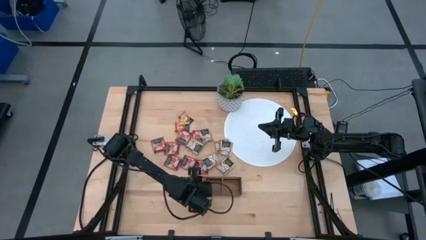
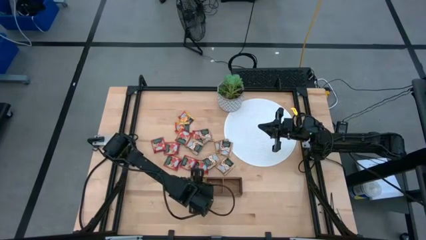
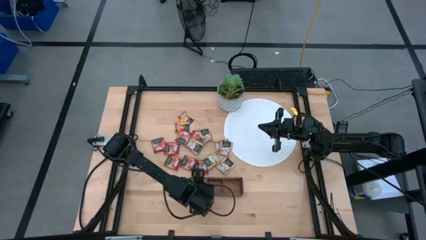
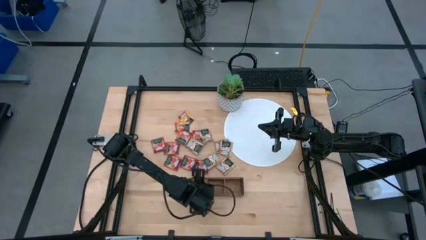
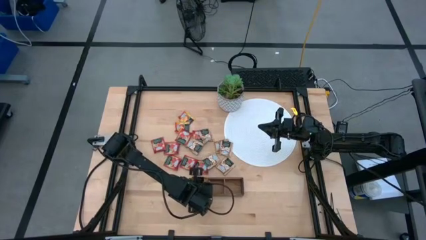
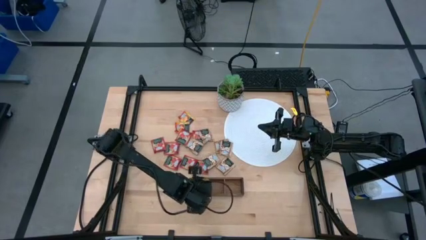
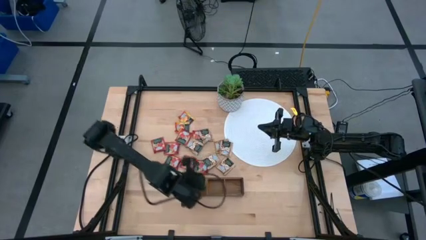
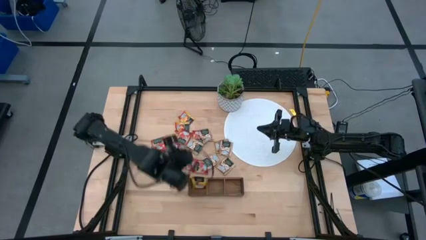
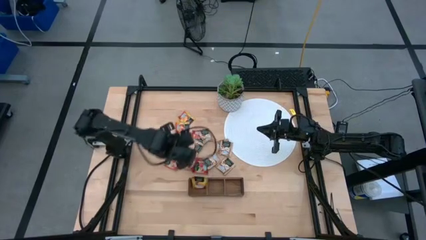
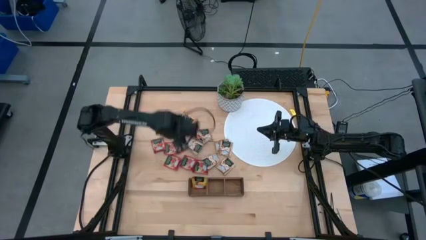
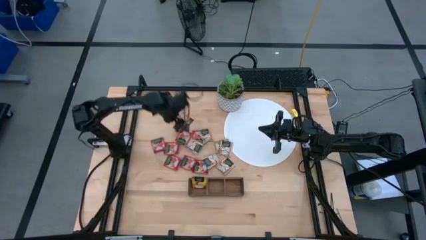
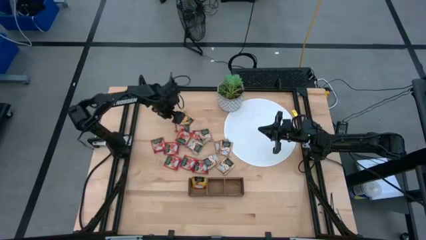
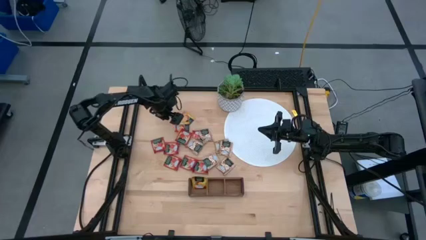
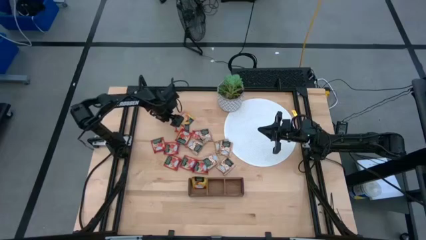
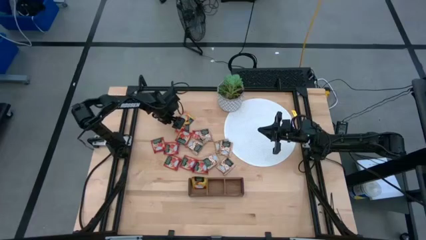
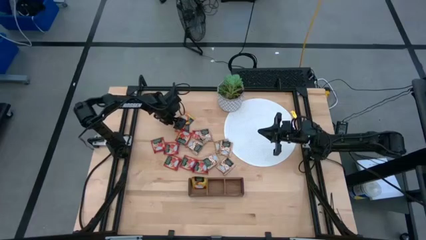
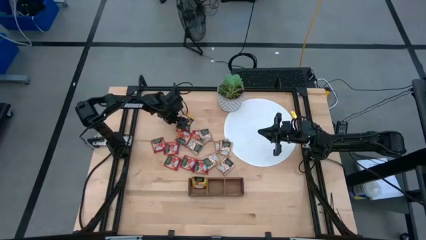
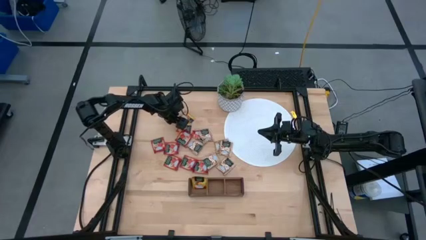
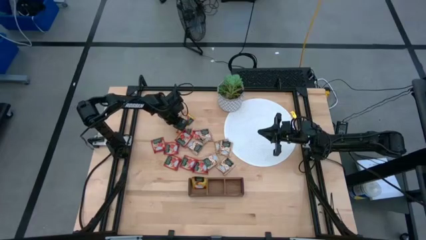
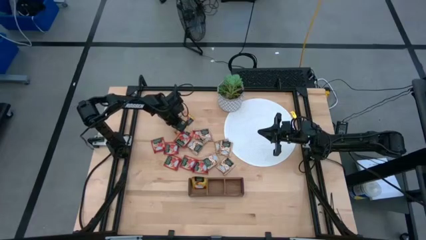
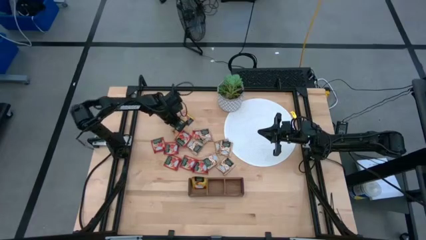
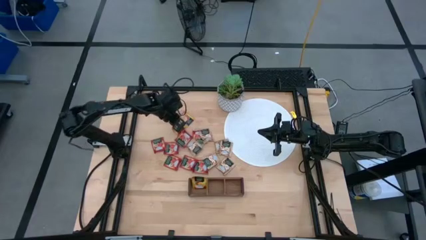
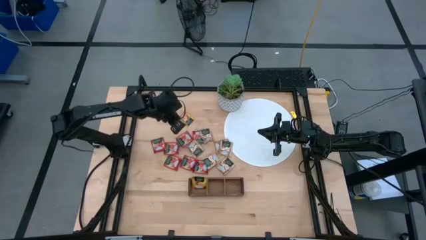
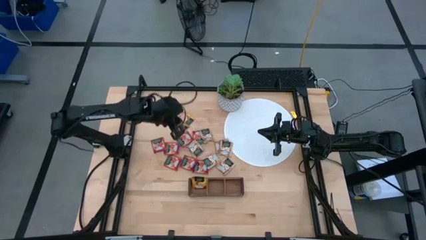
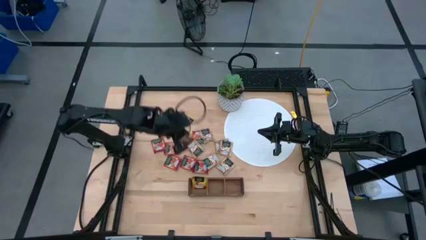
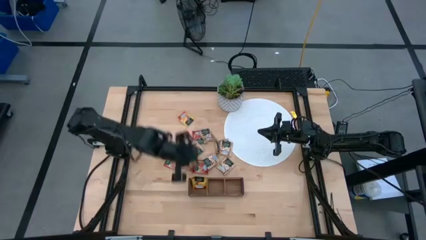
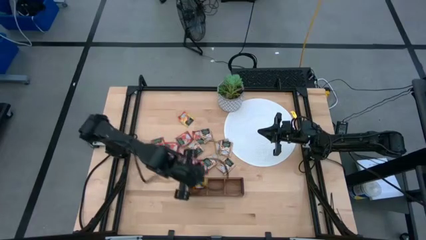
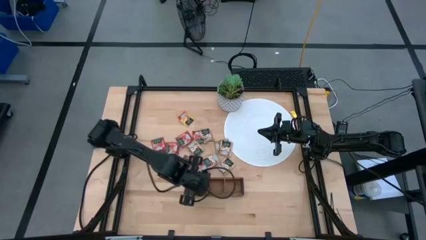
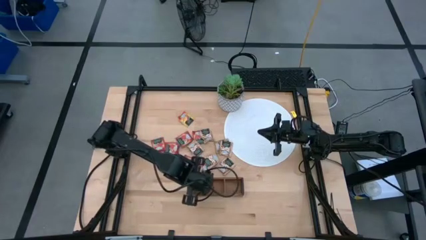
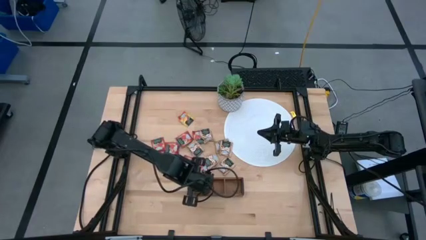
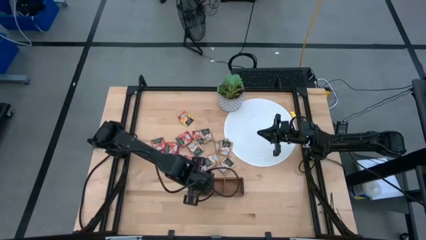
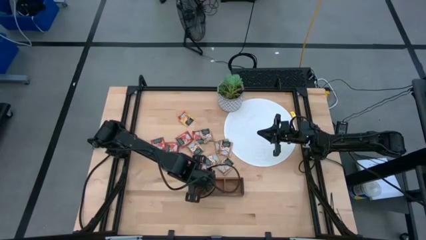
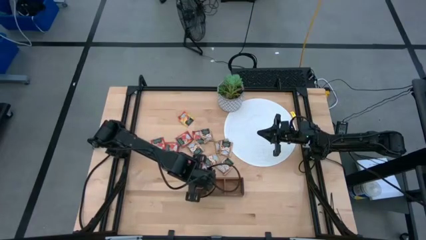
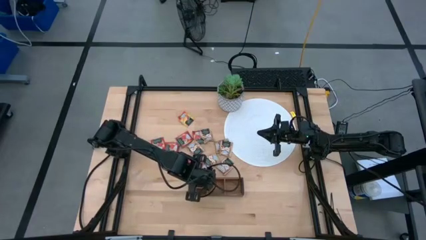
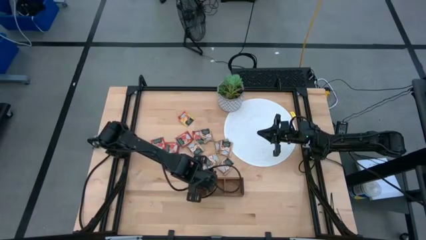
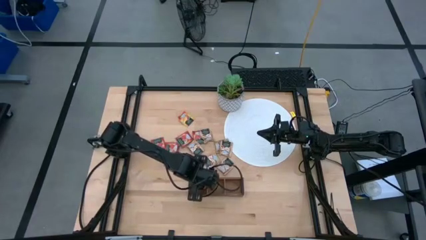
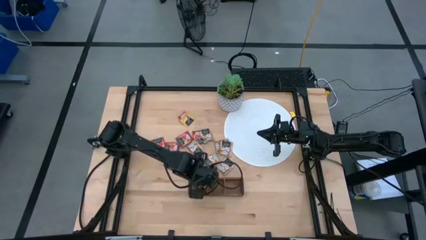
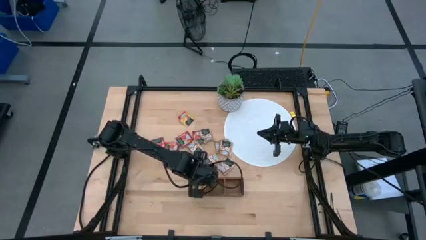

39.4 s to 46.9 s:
Task: Pick & Place Tea
Put the orange tea bag into the left section of the wooden organizer

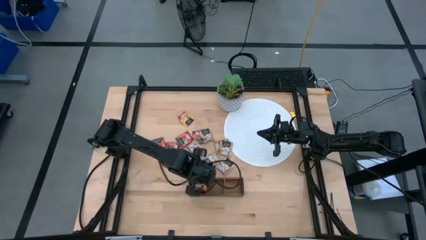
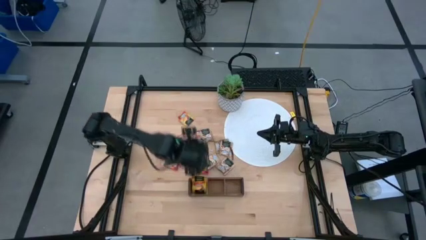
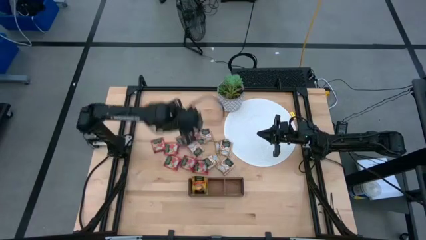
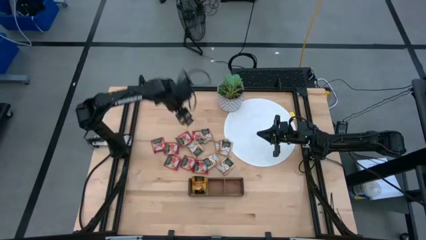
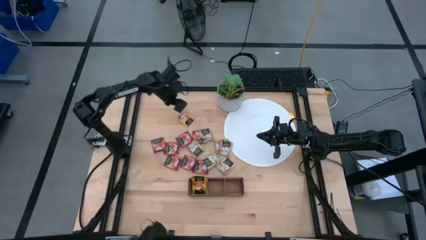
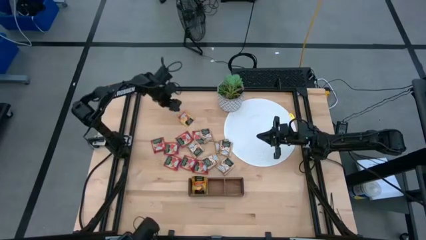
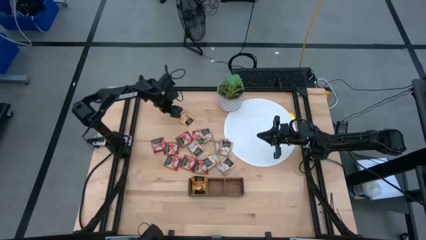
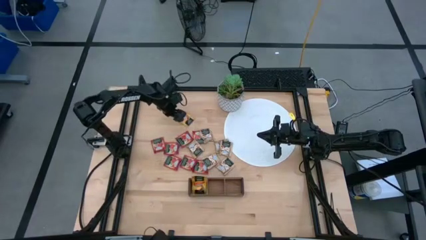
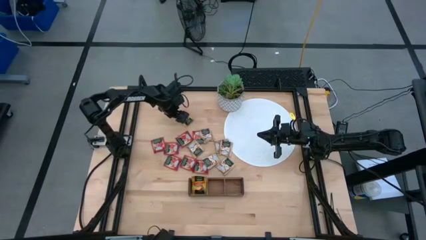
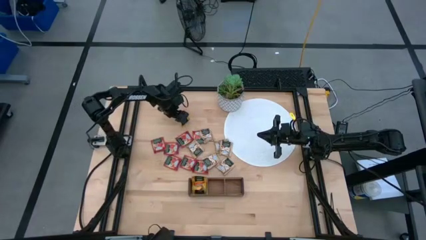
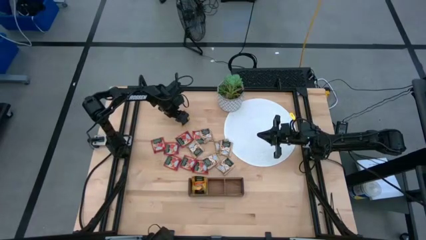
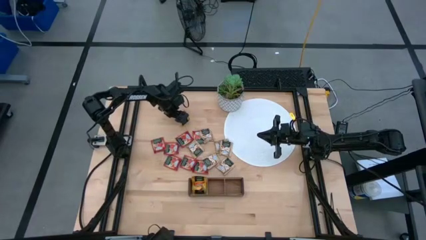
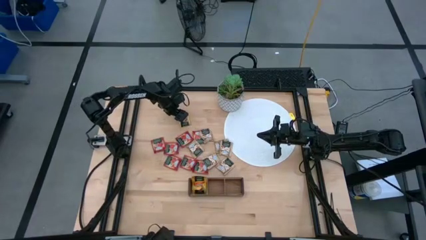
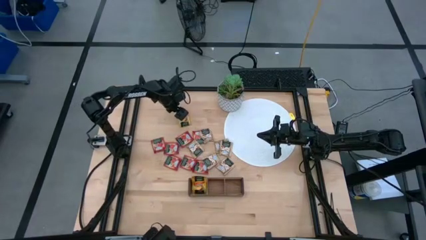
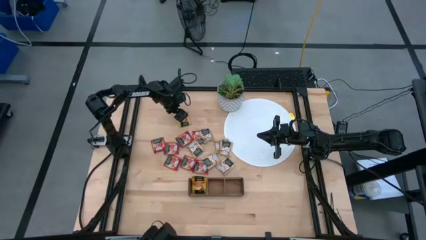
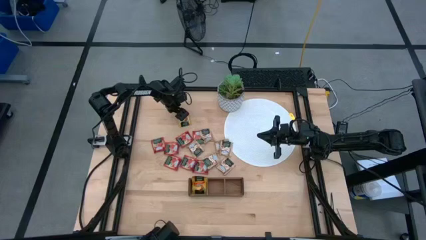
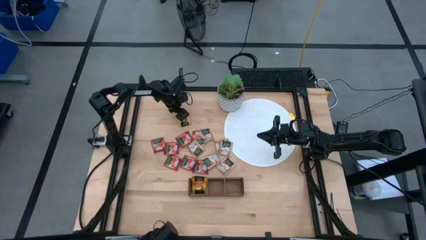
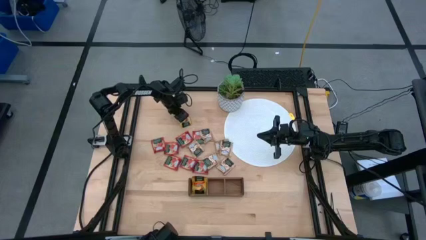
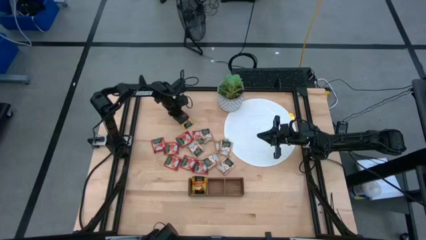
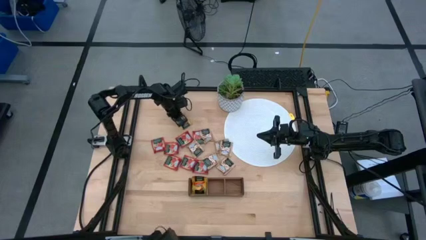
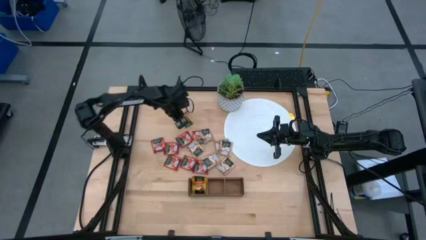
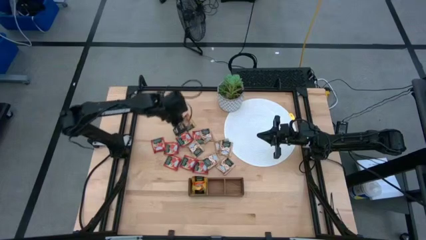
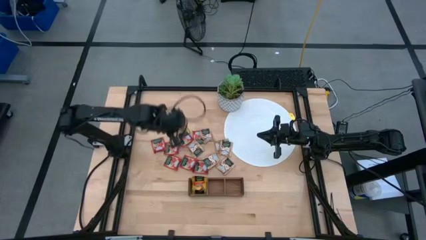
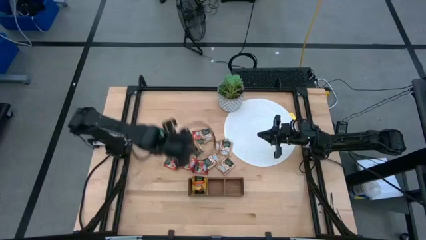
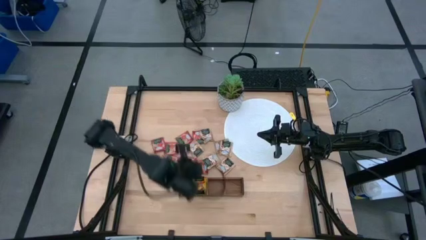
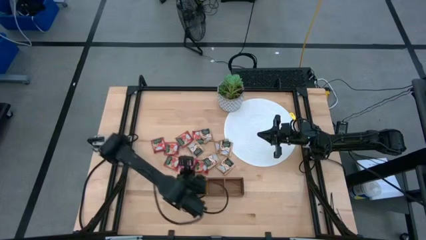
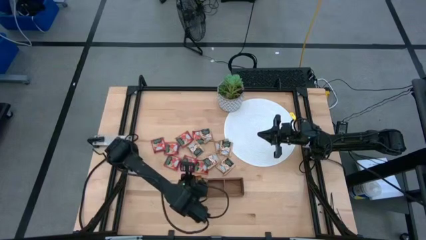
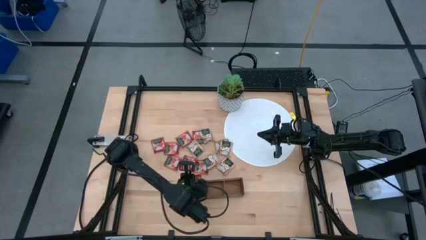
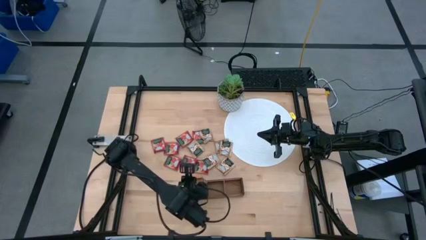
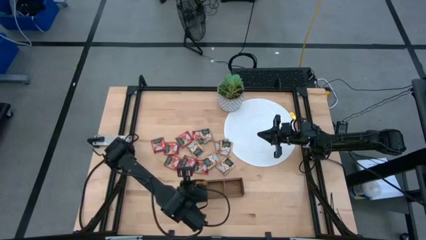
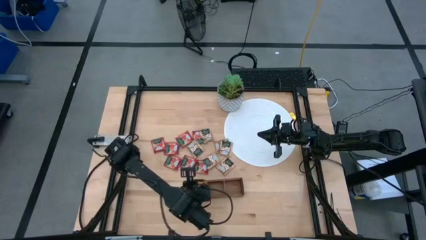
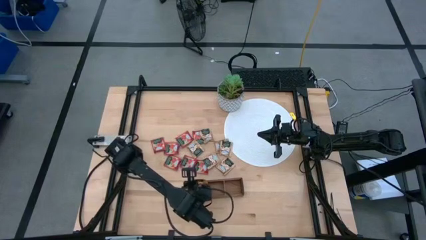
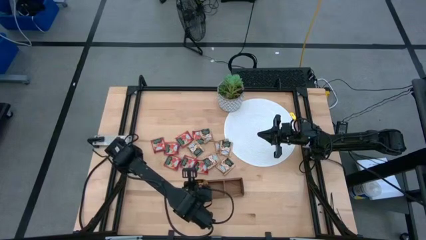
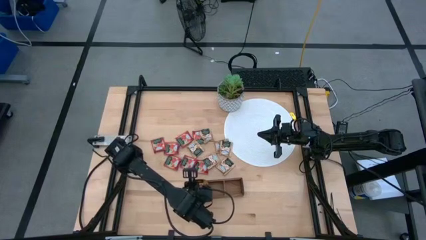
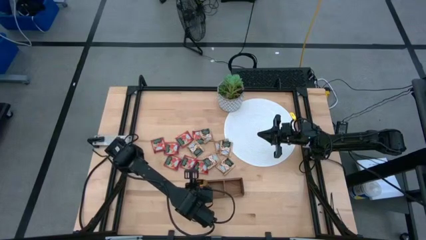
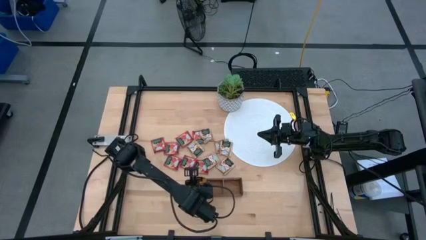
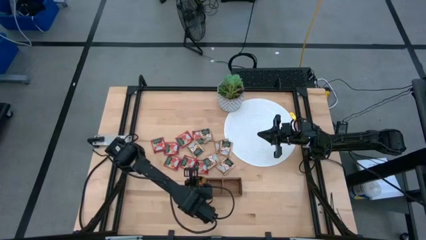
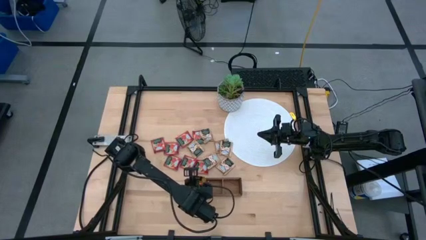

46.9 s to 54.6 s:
Put the orange tea bag into the left section of the wooden organizer

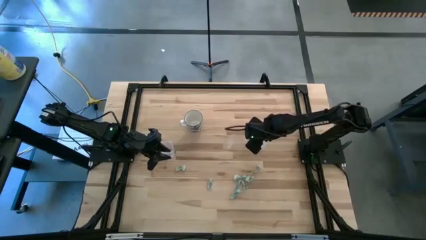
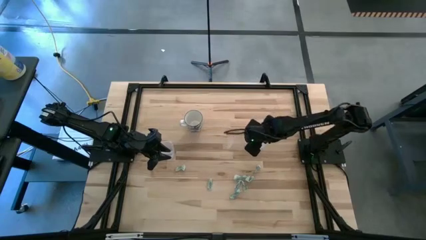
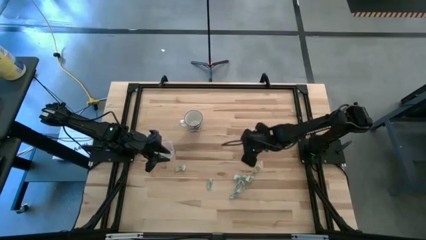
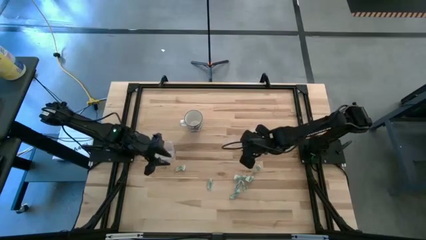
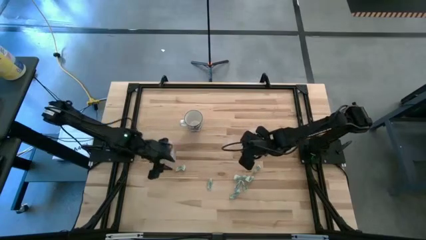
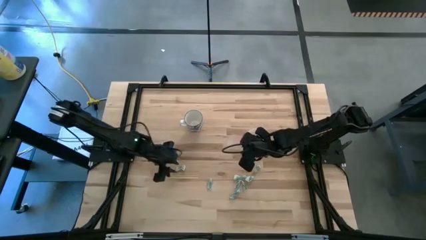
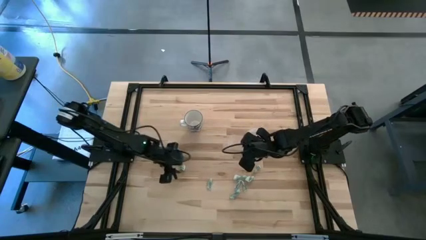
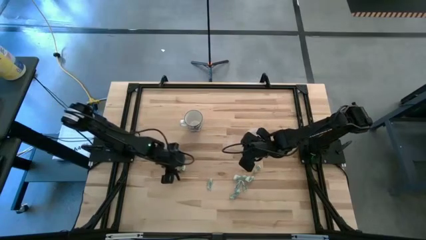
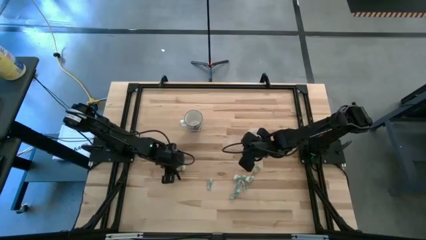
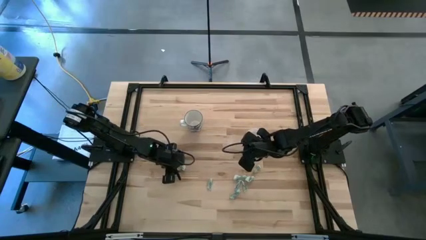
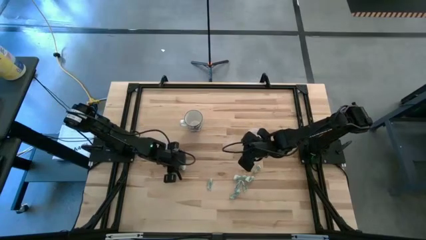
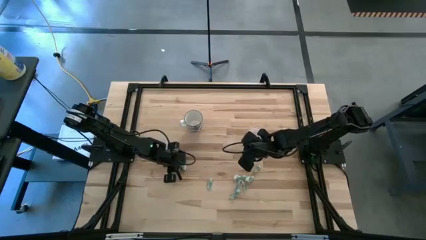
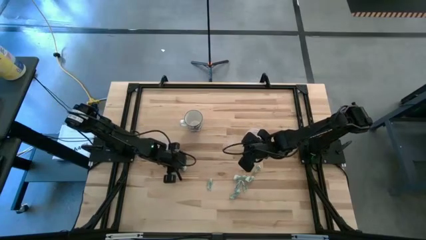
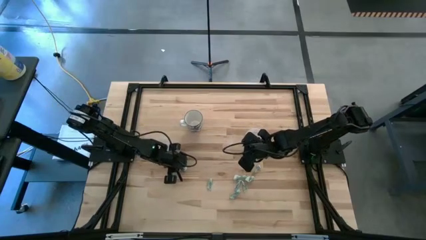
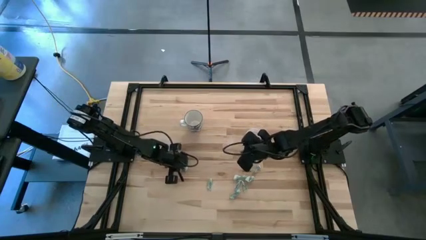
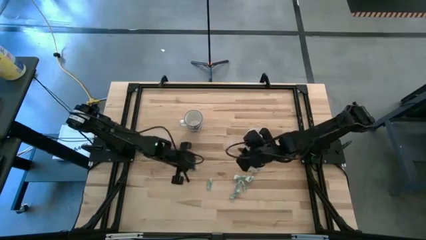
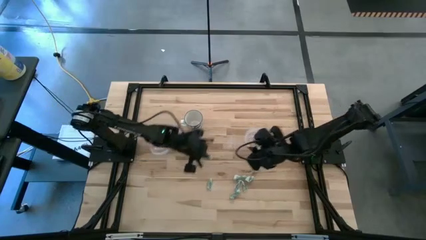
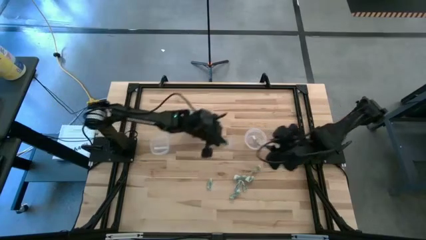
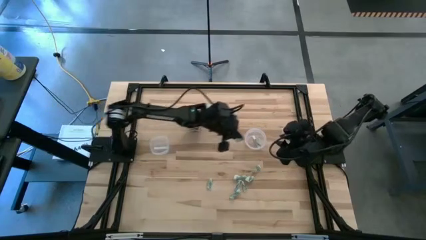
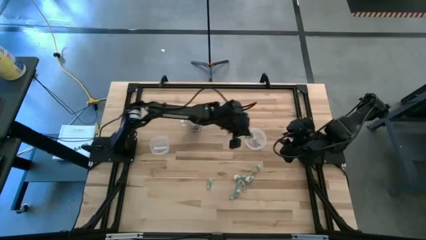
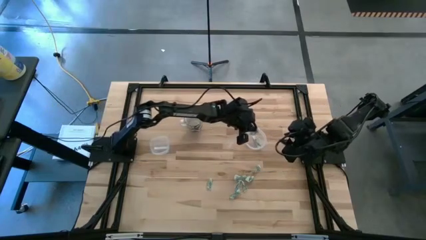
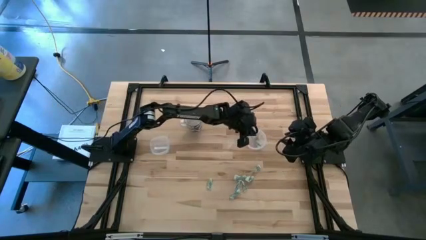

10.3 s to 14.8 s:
Task: Pick and place Stevia / Truvia into bins
Put the green stevia packet into the right transparent container
